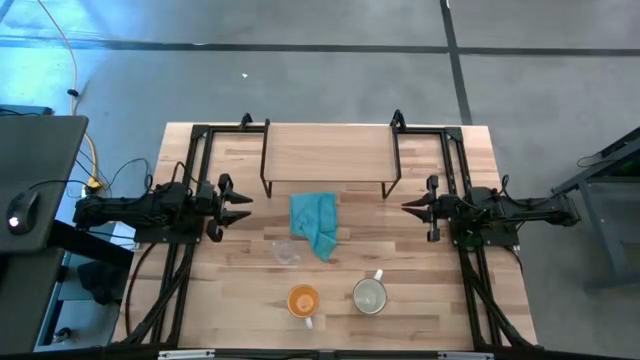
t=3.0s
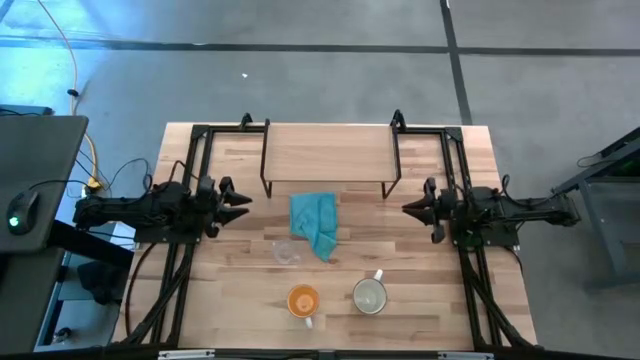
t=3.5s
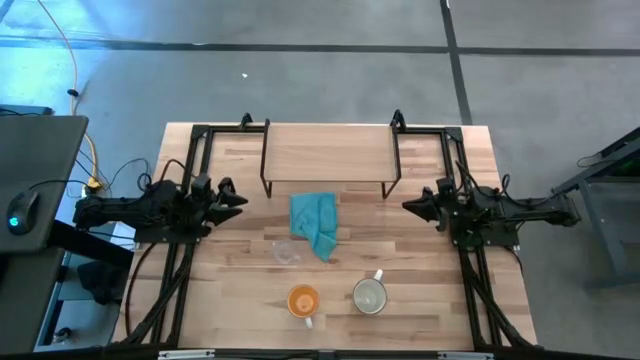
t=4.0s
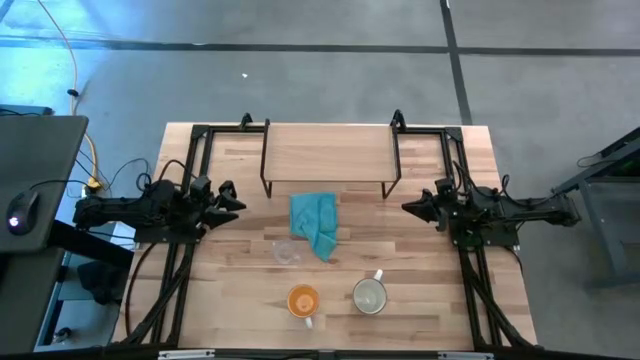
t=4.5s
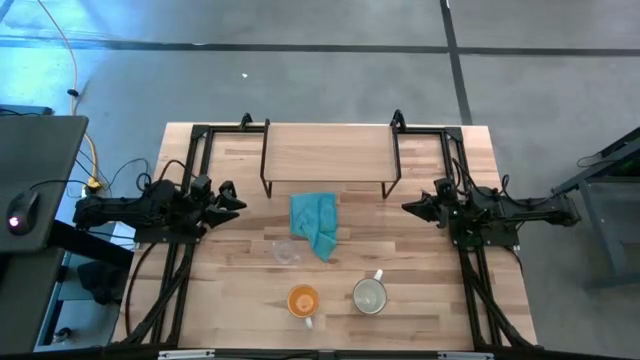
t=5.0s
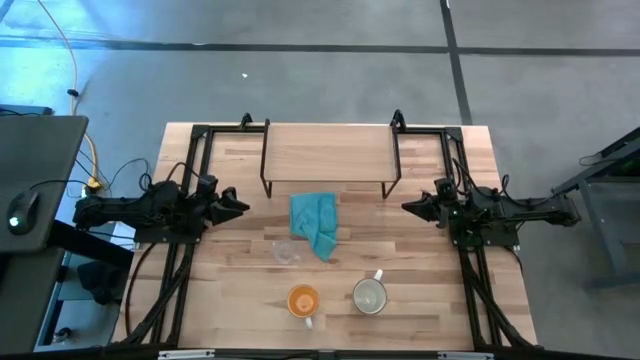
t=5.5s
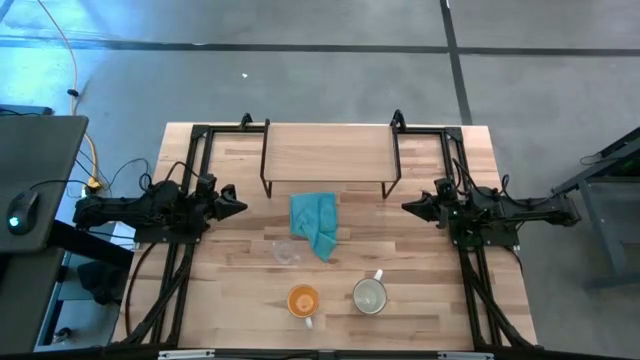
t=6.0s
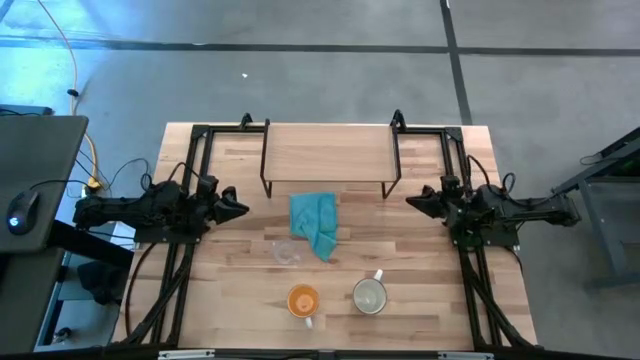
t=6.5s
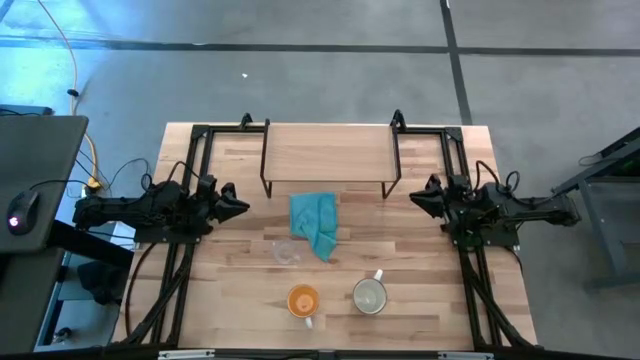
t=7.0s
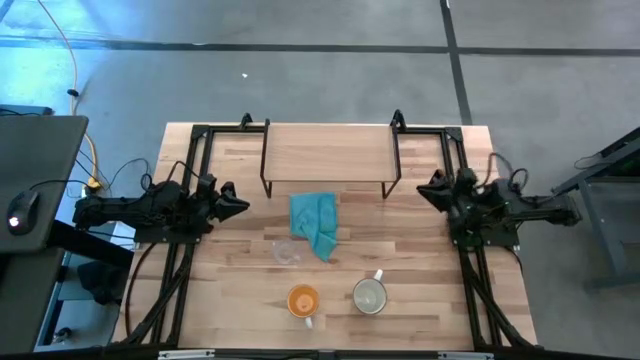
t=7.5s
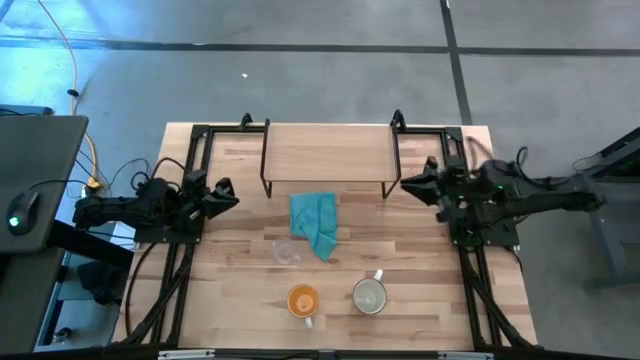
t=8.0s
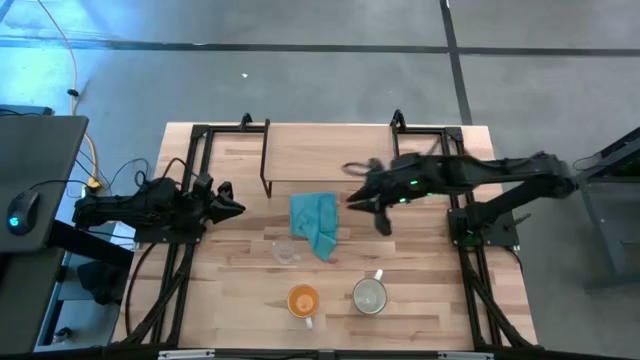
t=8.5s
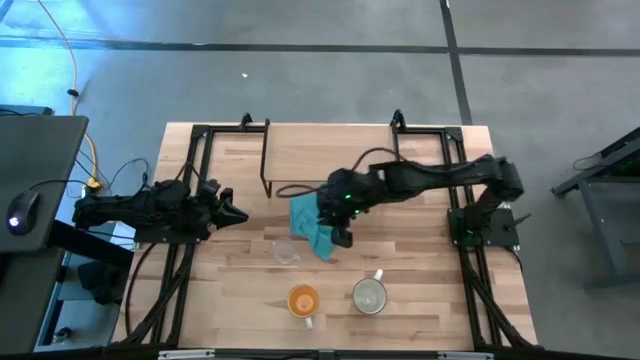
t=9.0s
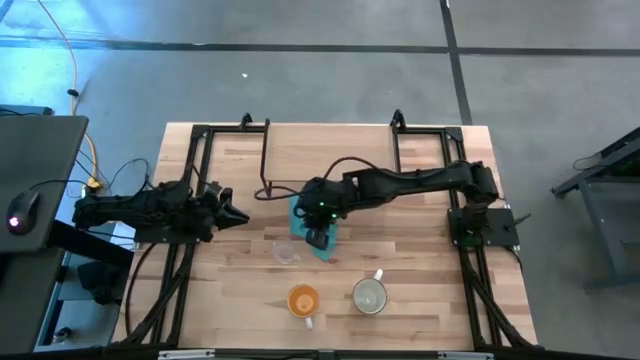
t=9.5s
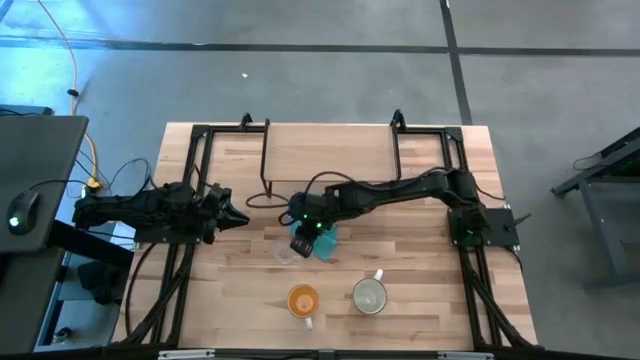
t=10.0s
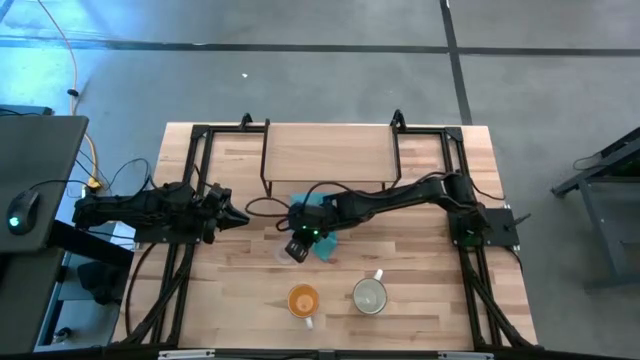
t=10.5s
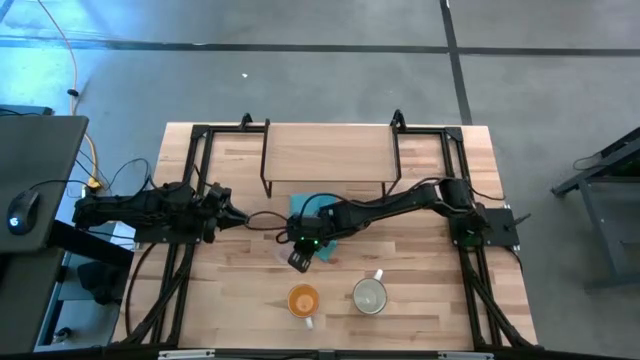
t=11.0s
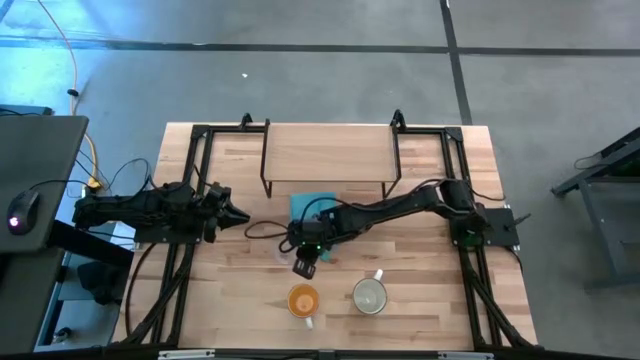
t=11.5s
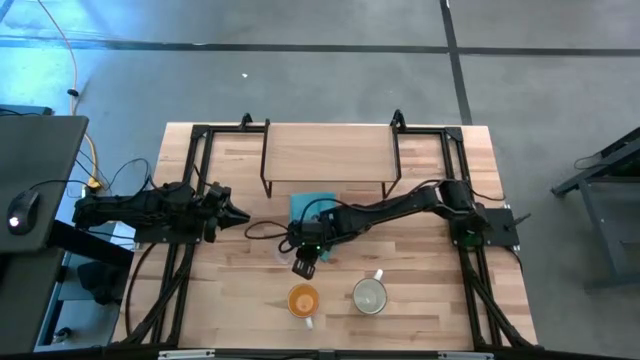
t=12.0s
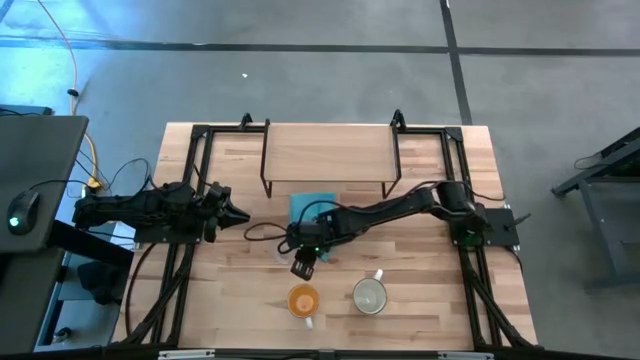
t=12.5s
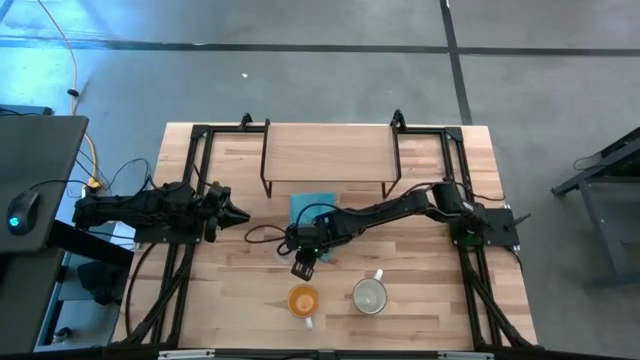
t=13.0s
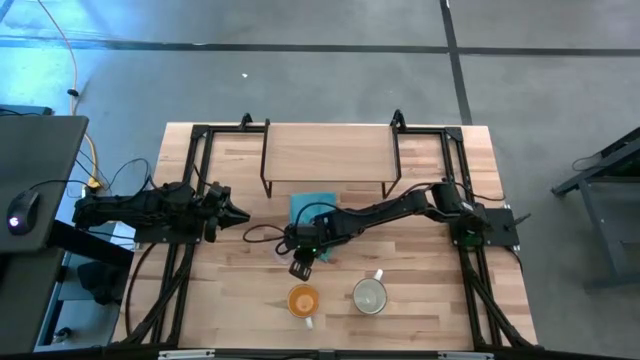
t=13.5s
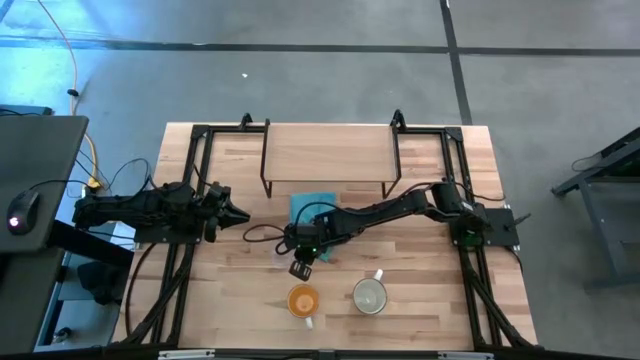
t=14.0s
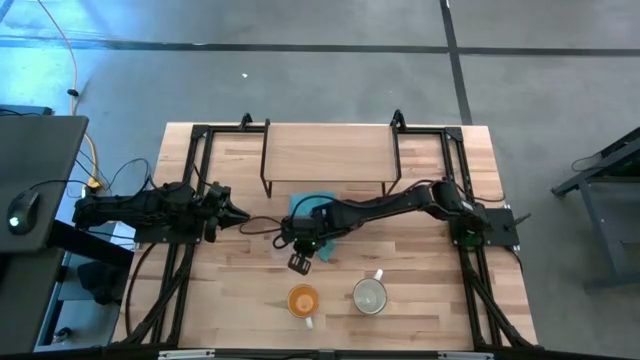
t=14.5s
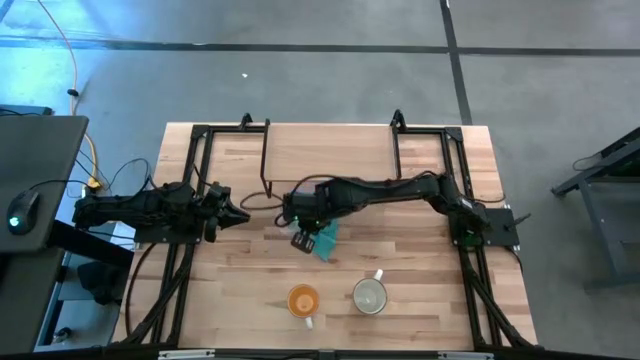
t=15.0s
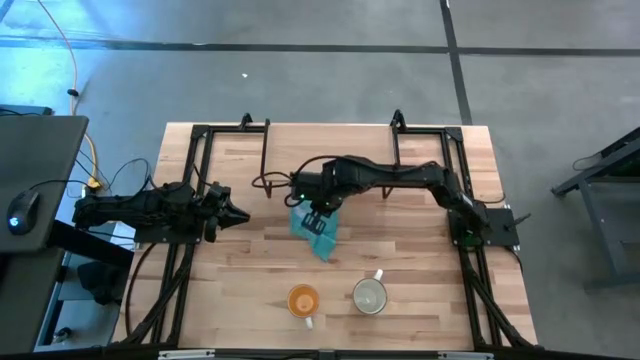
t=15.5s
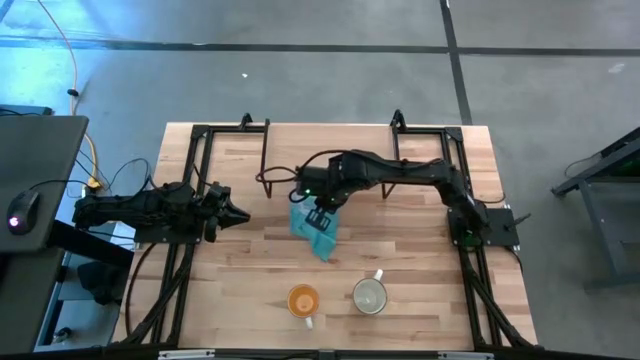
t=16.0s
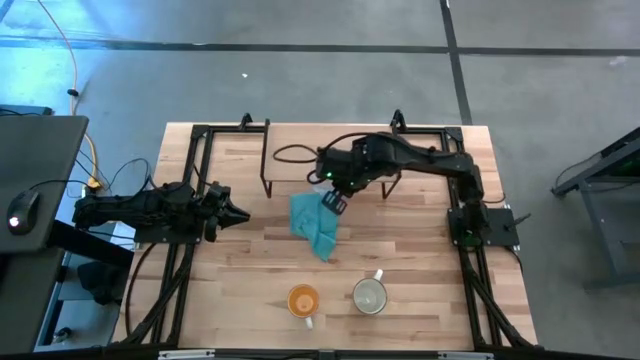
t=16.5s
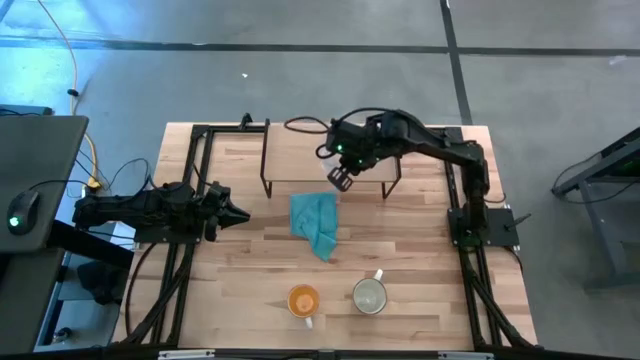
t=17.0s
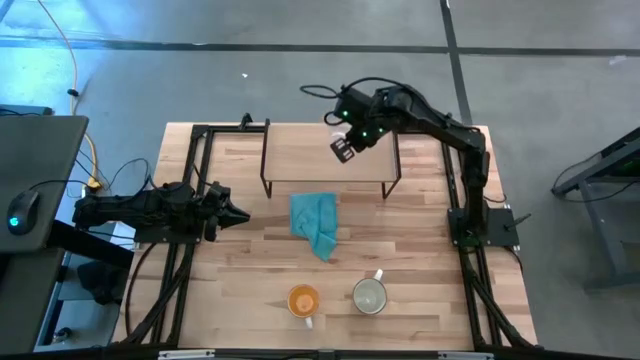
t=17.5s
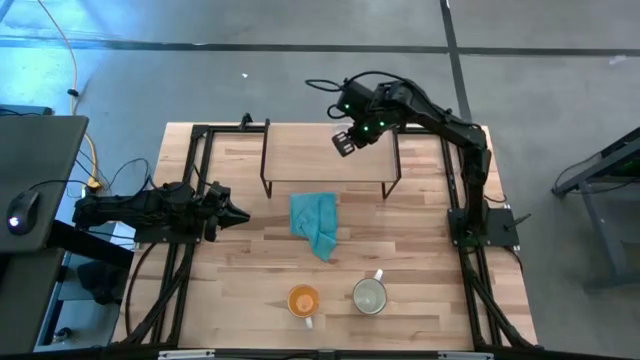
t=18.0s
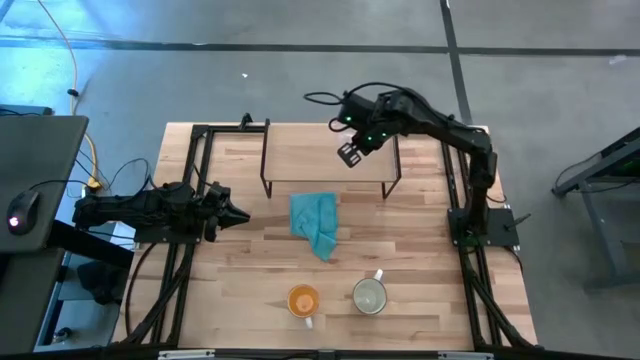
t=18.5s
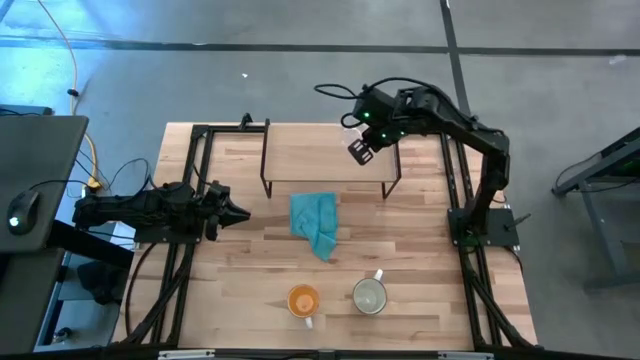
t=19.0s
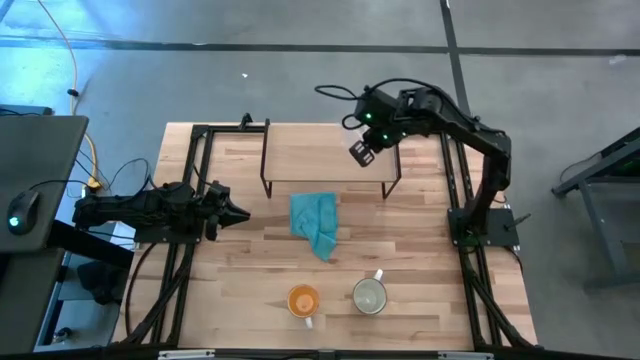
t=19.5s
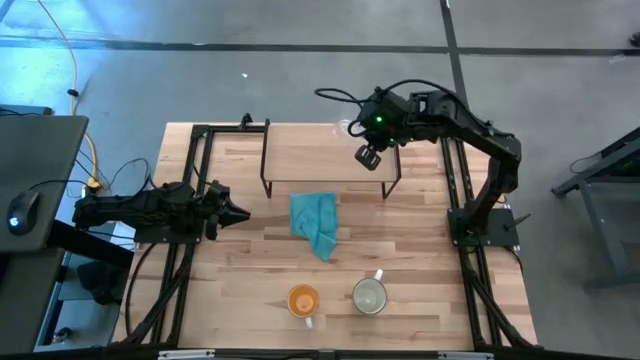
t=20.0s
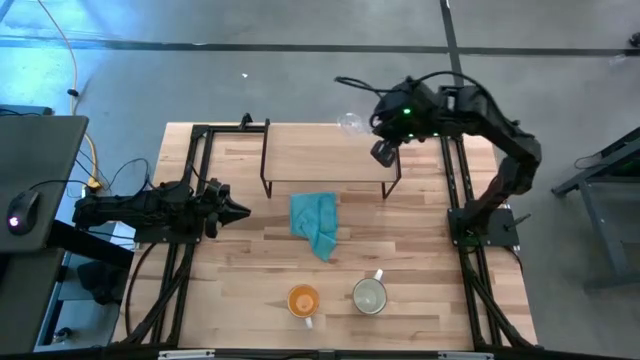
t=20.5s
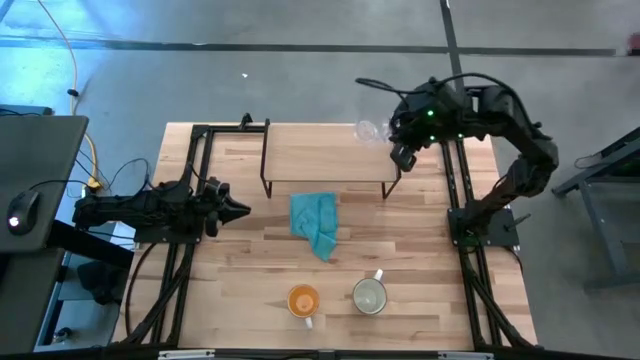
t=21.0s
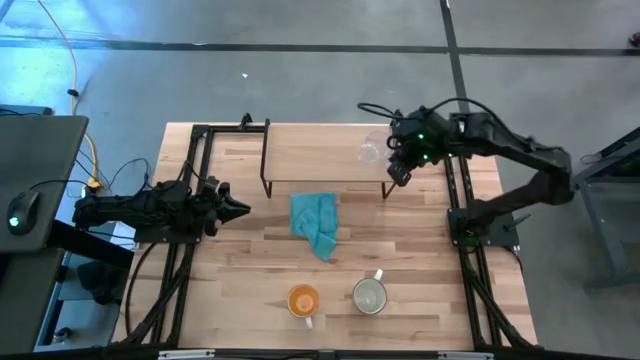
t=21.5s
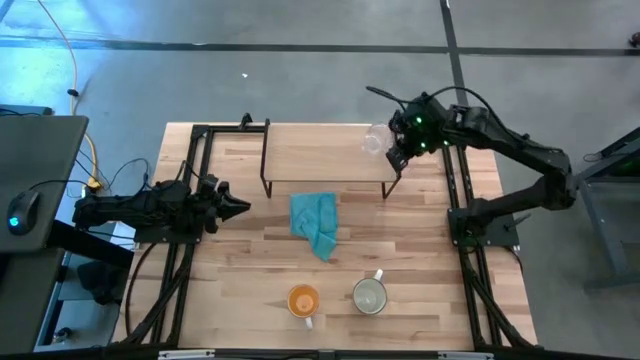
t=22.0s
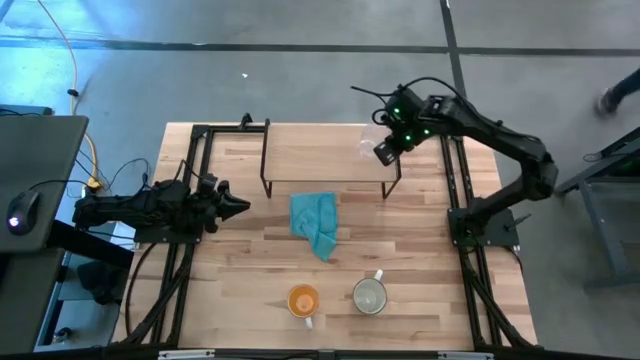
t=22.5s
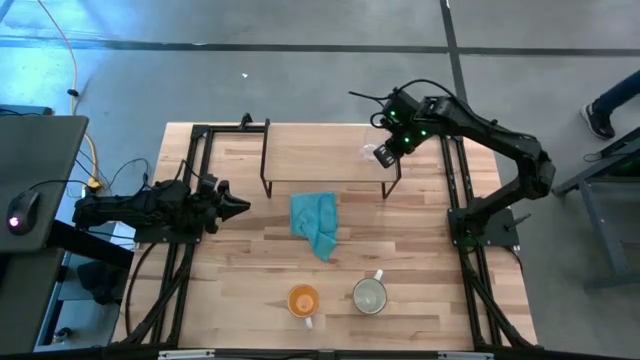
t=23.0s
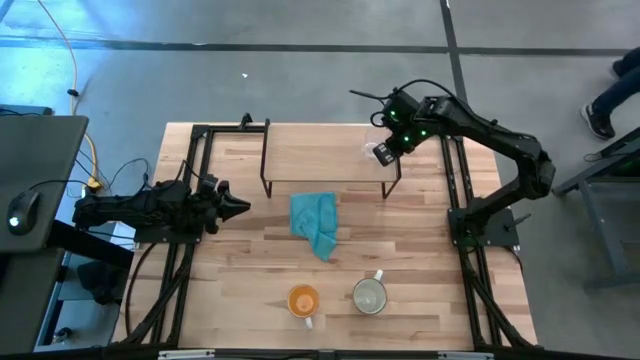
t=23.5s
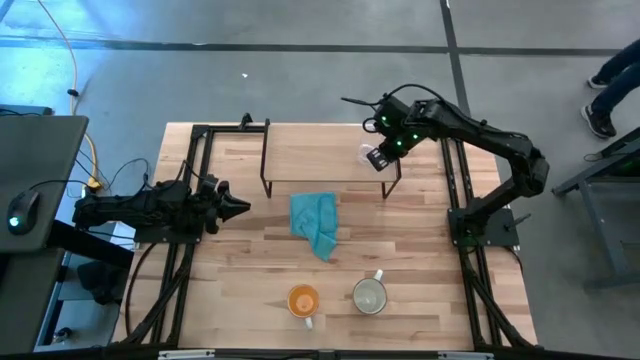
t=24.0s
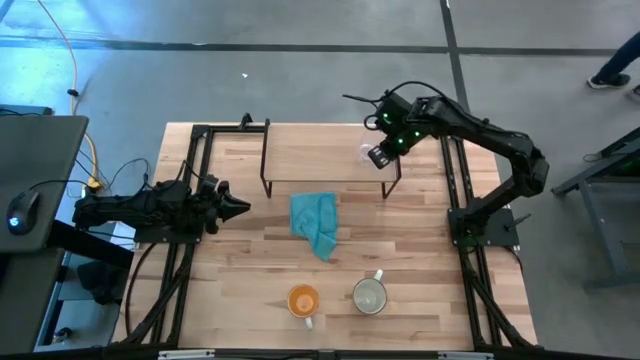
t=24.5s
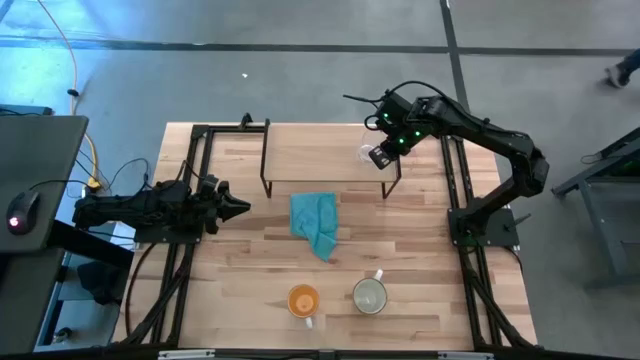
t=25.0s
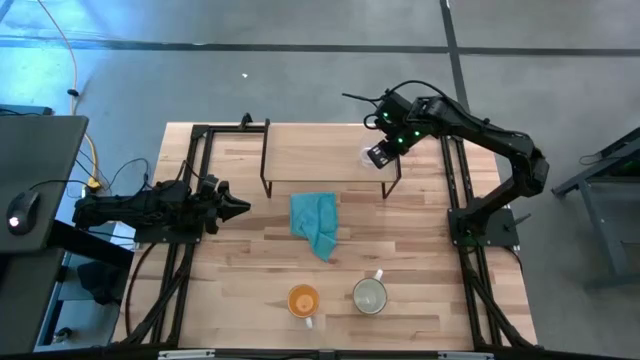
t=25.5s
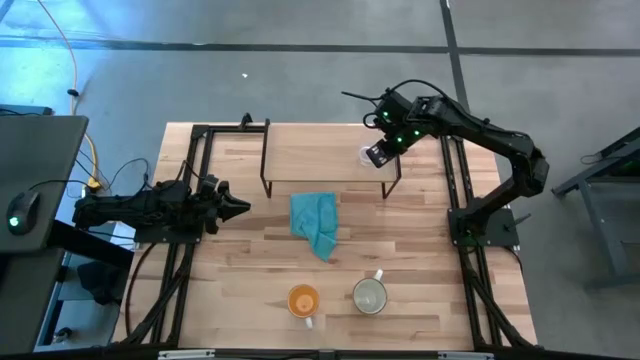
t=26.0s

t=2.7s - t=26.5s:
Task: Stack small to large cups/mugs on shelf
Put the transparent mug on the shelf
